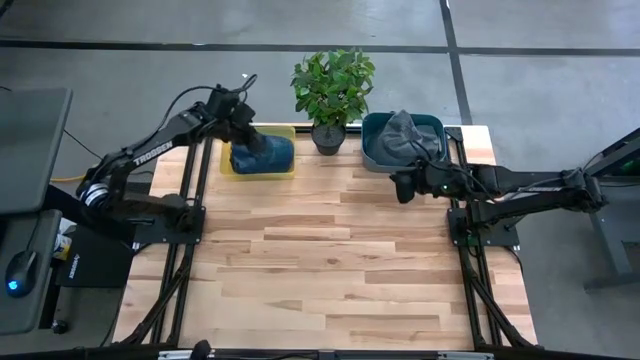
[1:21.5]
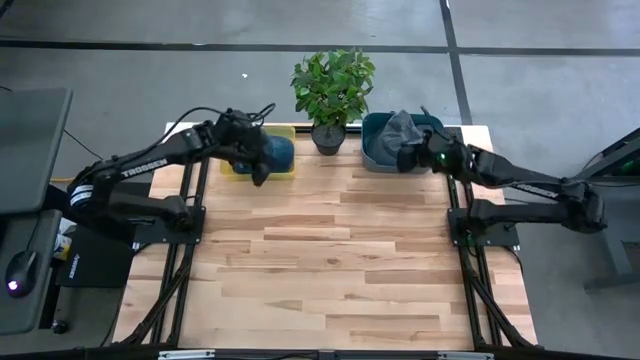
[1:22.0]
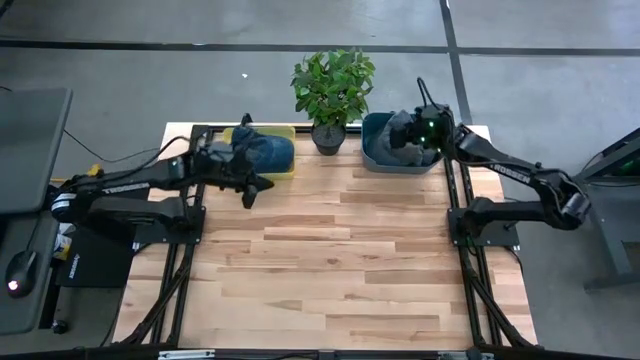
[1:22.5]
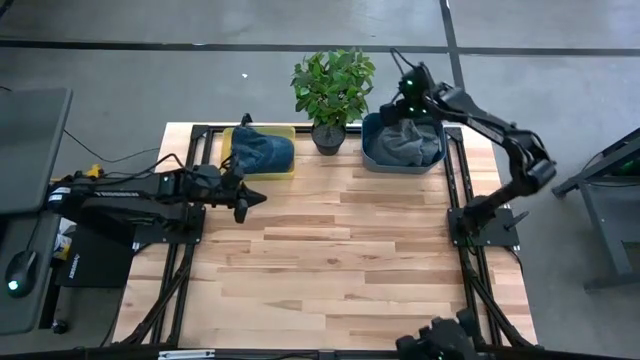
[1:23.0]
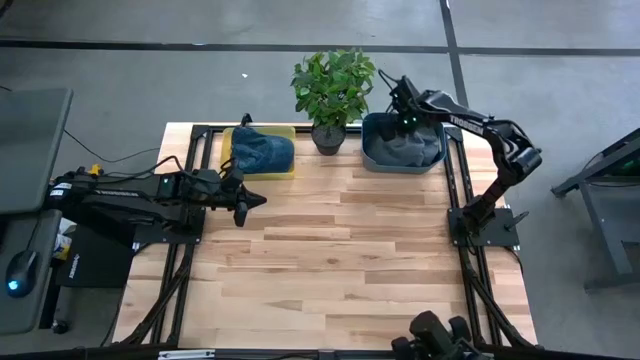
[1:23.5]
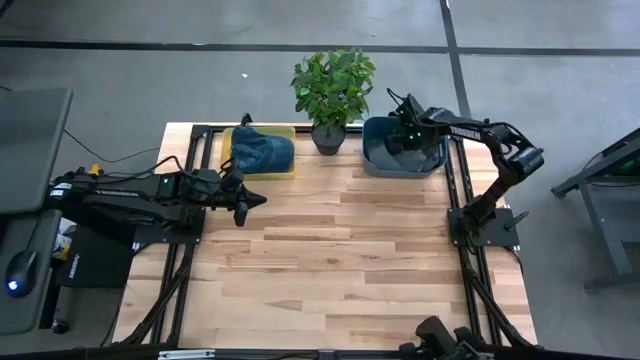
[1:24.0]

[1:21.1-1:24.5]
Task: Pick & Place hat
Adjust the gray cap

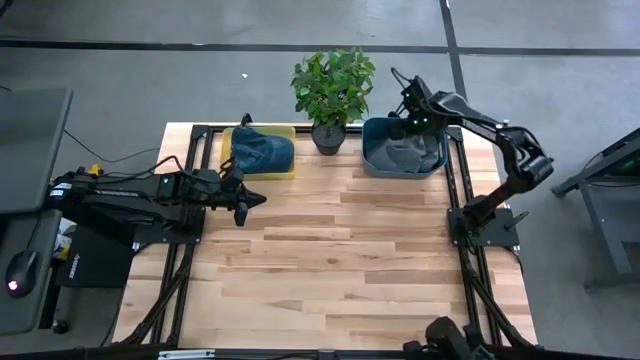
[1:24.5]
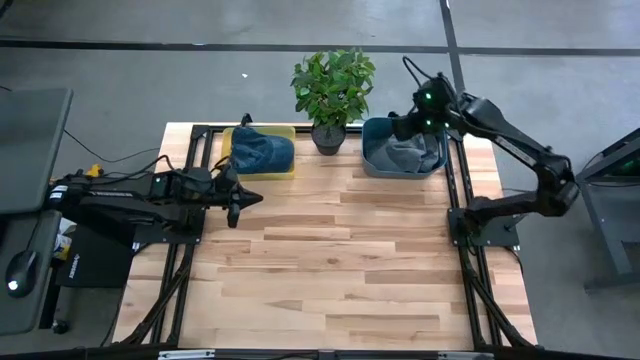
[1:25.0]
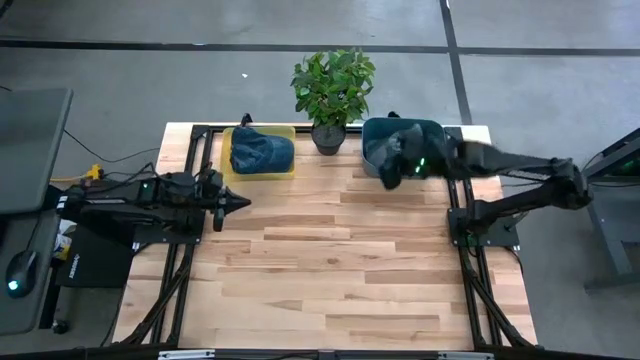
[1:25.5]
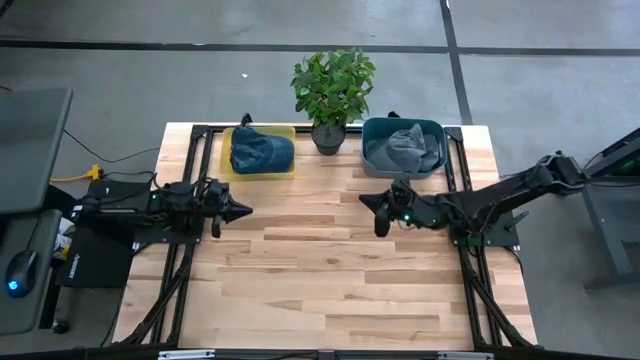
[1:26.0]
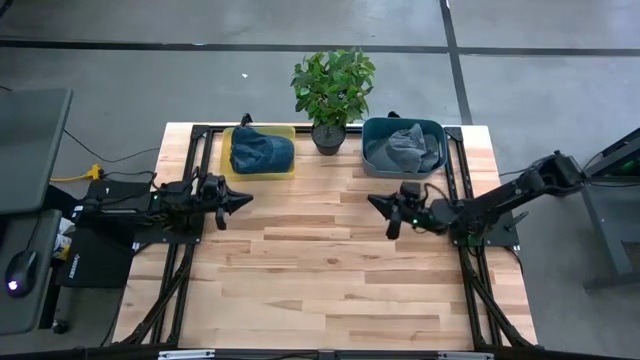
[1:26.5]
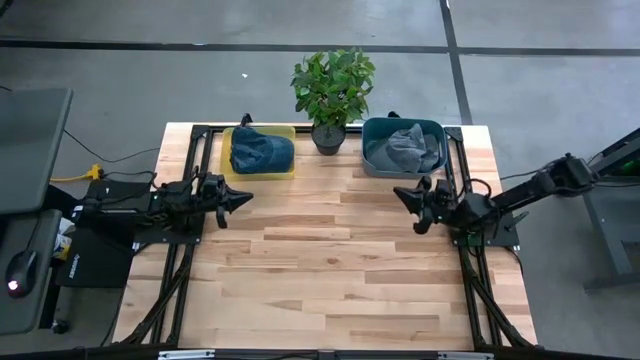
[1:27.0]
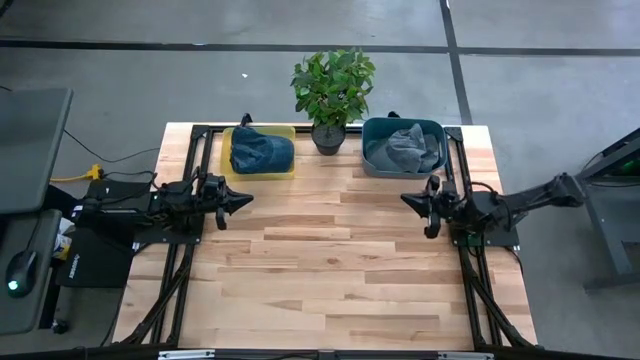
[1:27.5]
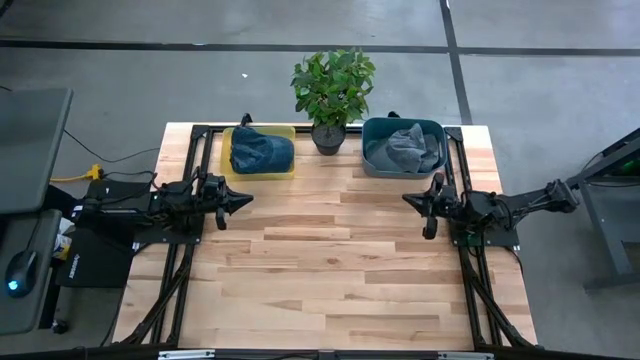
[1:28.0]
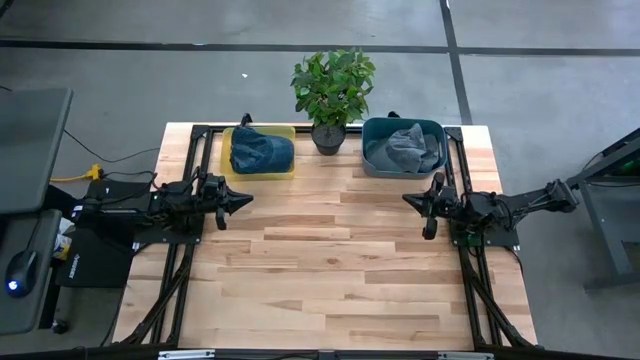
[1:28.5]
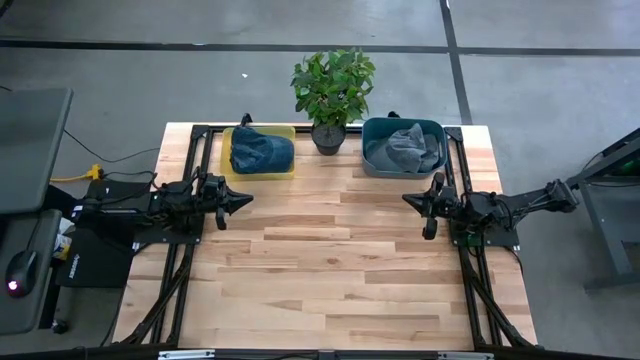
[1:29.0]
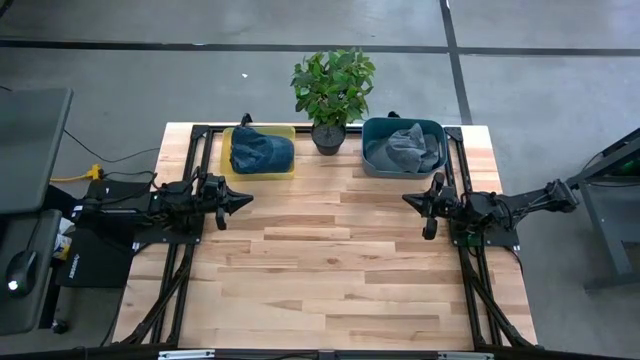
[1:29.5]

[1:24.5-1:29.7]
Return to Home Position

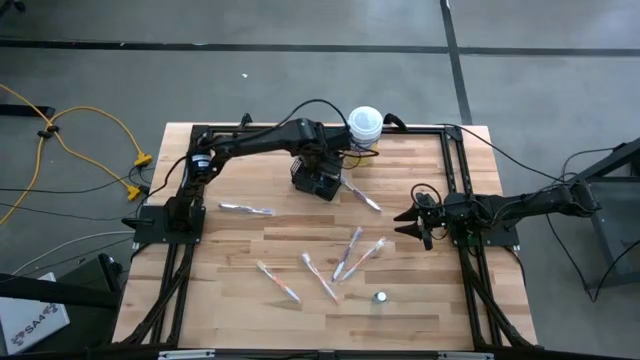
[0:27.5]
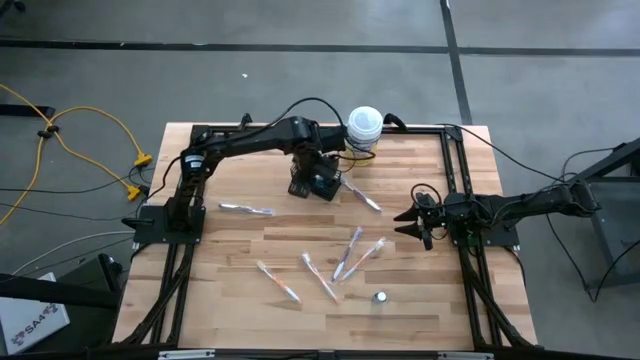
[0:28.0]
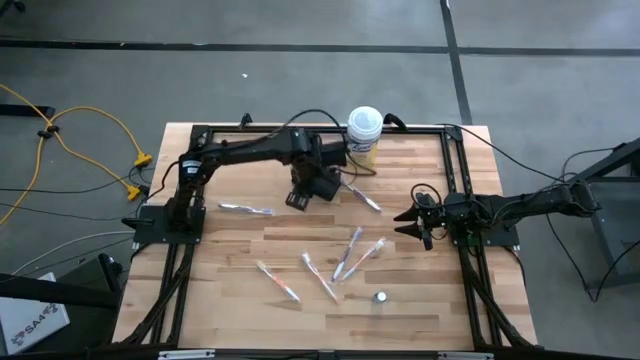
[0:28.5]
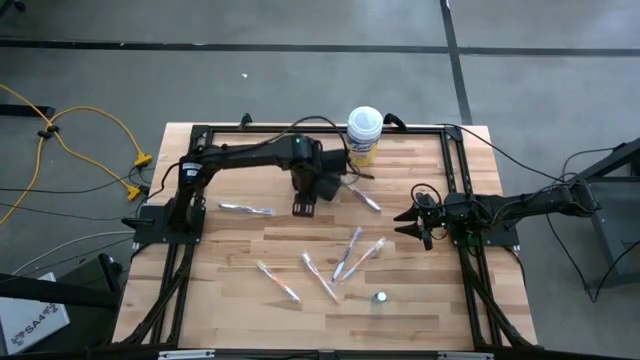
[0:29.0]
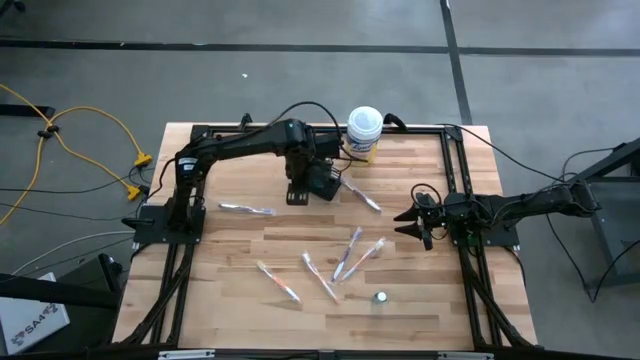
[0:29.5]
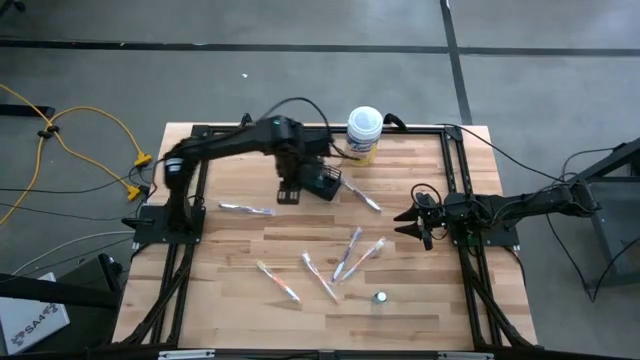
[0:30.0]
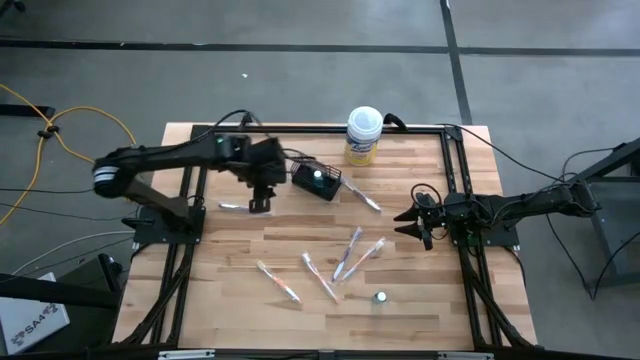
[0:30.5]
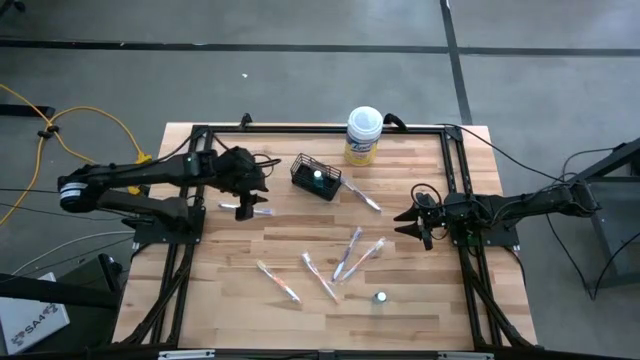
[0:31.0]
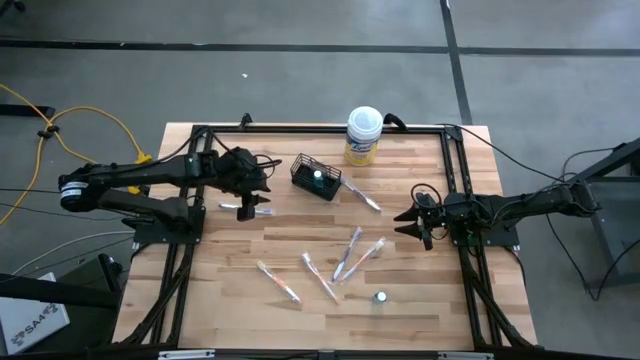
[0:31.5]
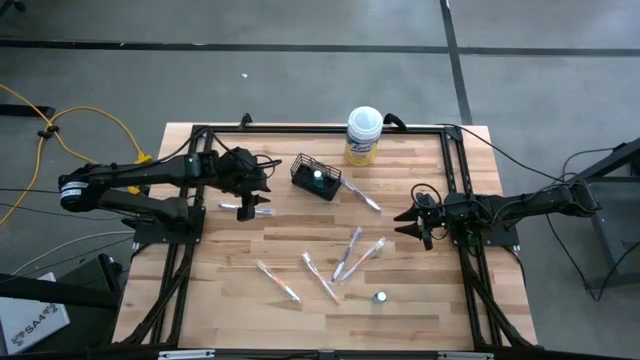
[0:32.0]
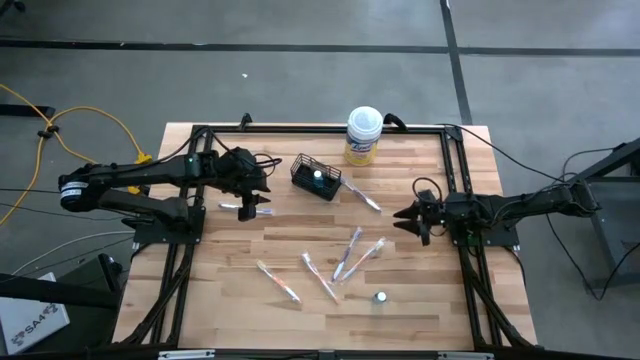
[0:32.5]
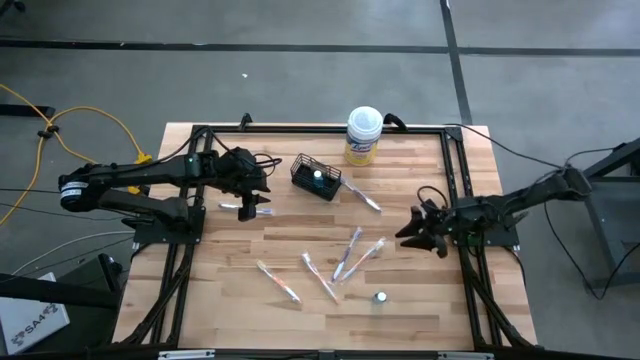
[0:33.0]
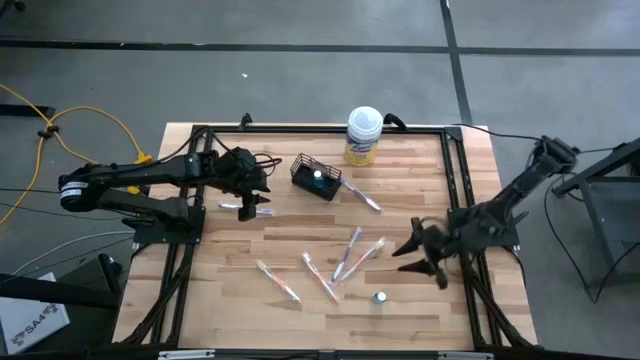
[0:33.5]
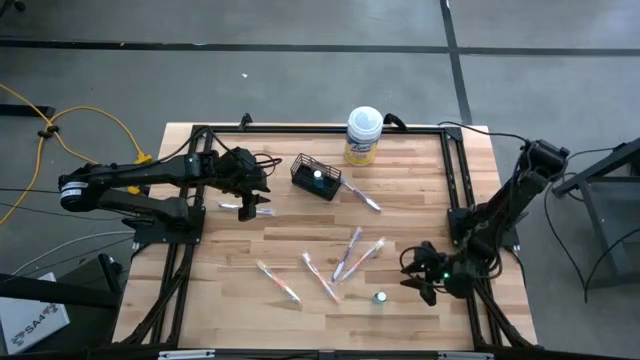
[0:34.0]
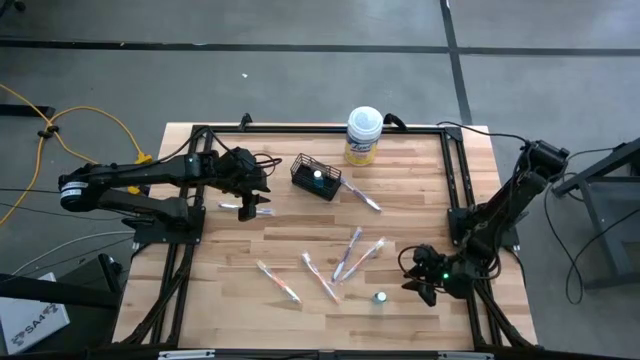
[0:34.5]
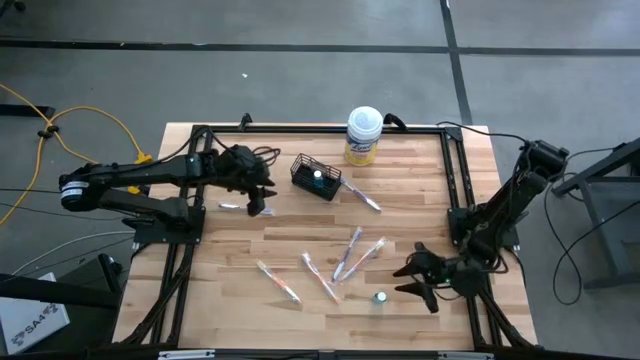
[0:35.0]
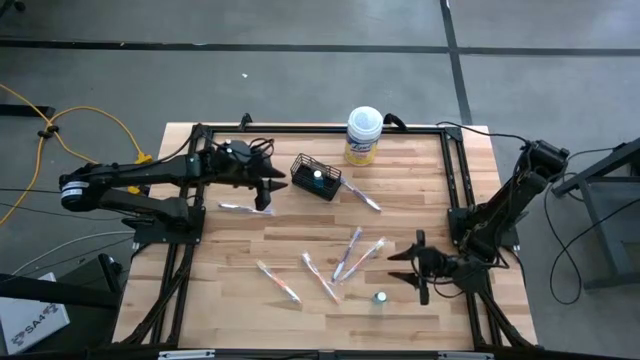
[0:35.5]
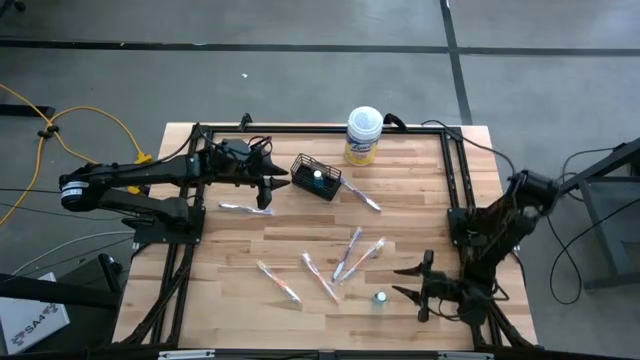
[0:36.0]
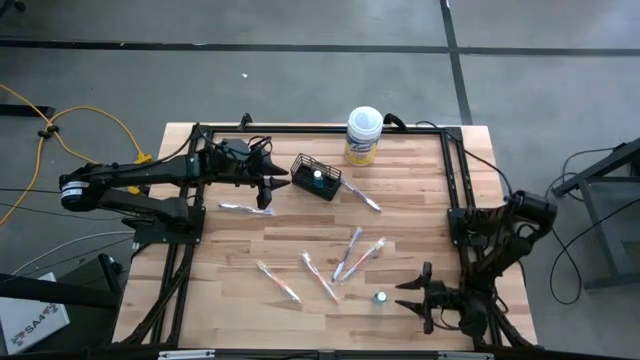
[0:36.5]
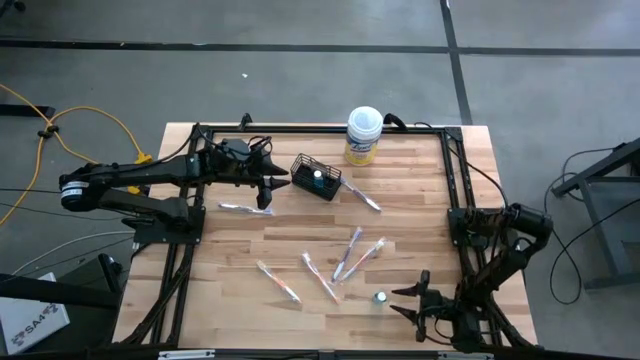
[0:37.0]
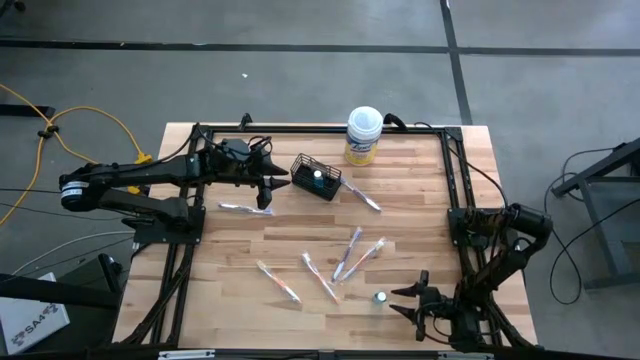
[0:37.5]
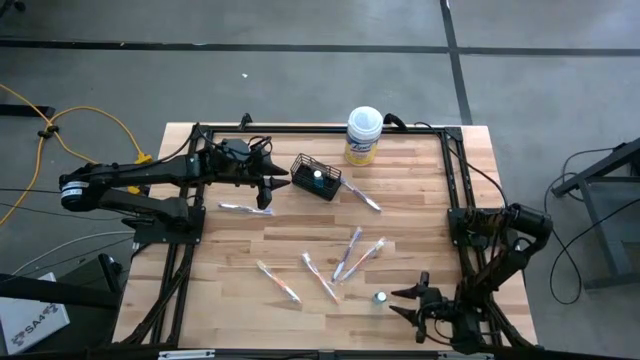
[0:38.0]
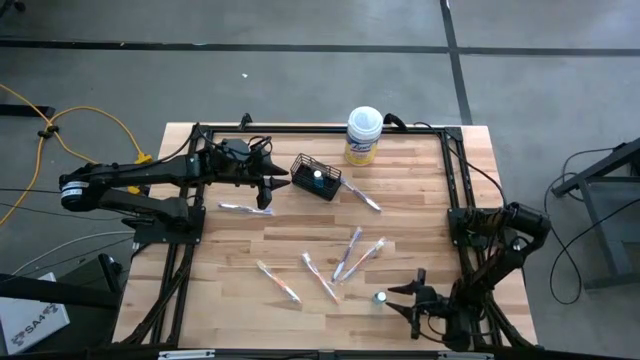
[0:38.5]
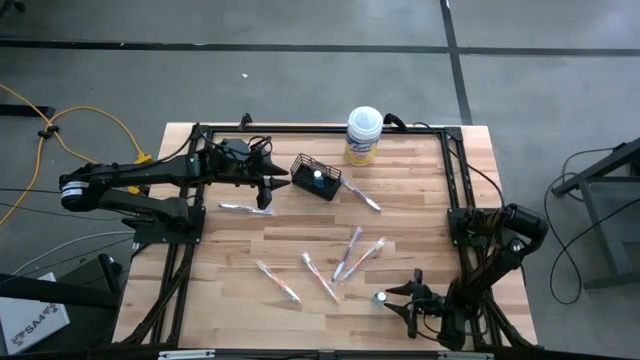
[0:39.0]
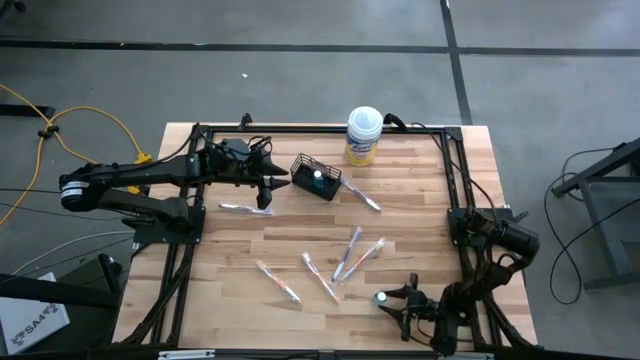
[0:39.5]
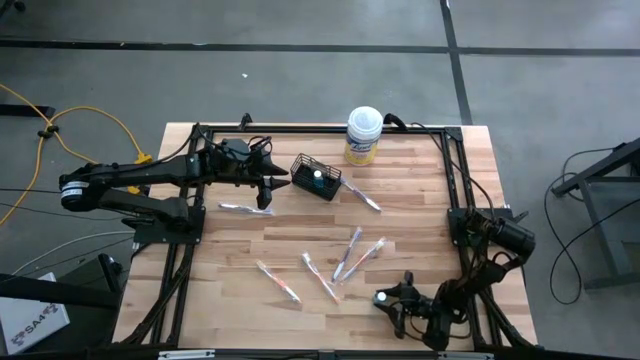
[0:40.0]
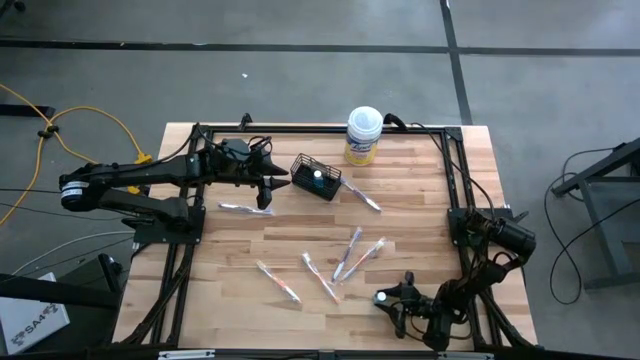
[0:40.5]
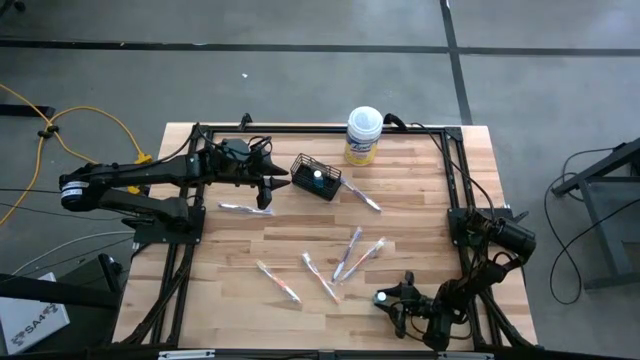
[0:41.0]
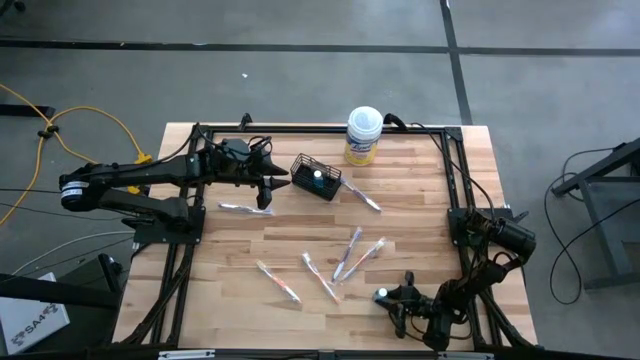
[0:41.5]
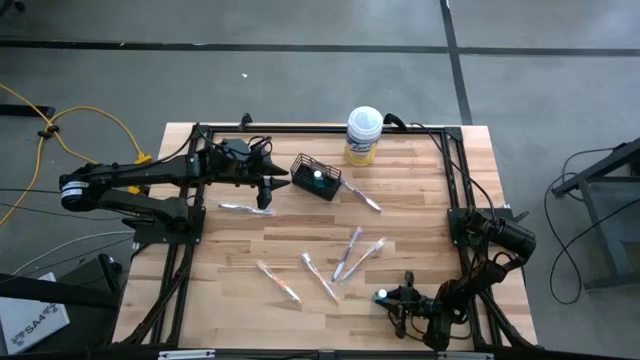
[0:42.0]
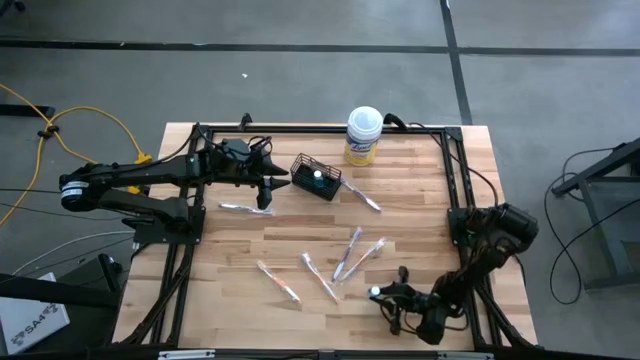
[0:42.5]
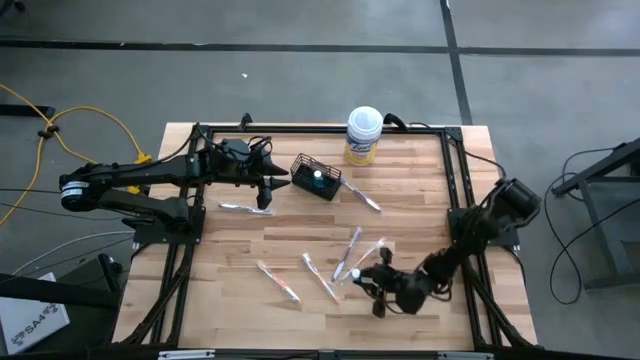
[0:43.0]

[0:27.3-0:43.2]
Task: Pick & Place toothbrushing station
Put the blue mouthwash into the black mesh organizer
